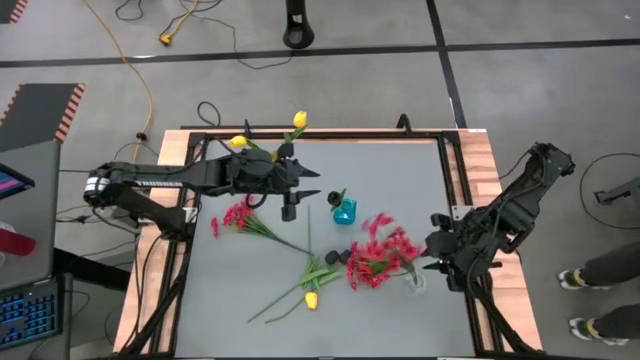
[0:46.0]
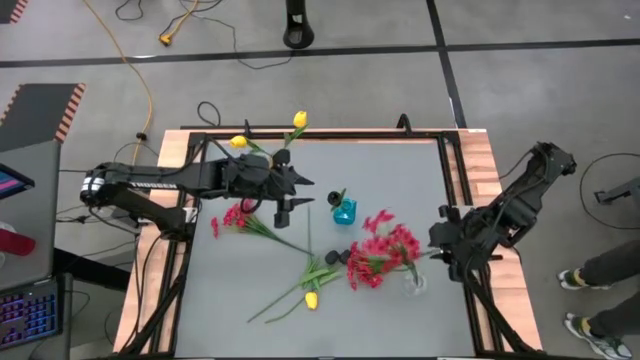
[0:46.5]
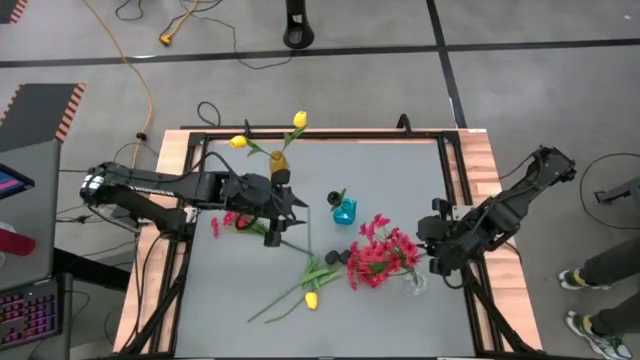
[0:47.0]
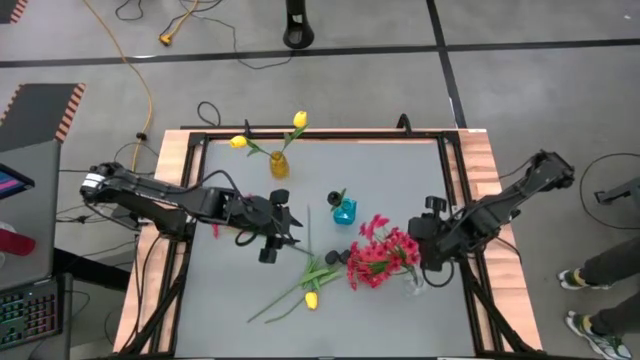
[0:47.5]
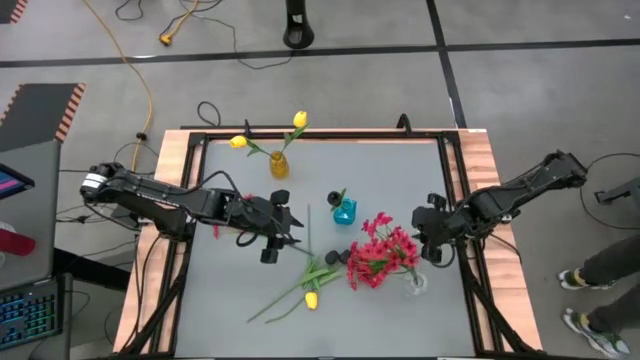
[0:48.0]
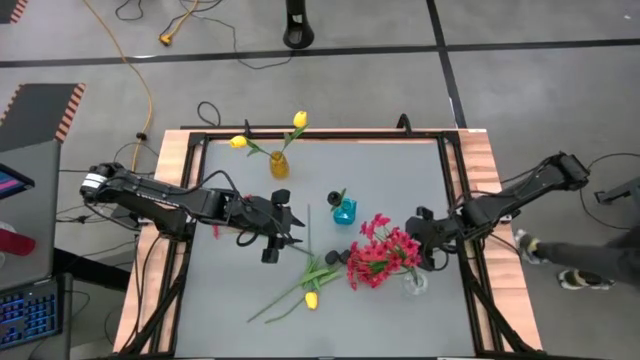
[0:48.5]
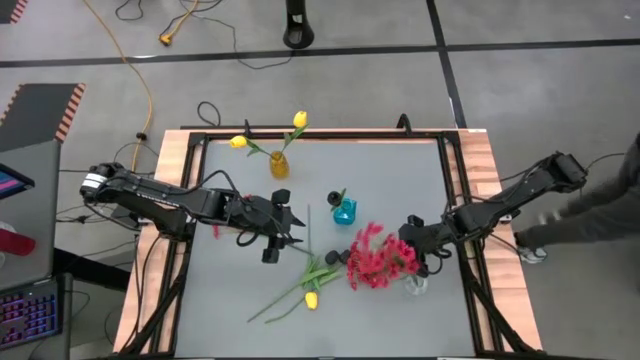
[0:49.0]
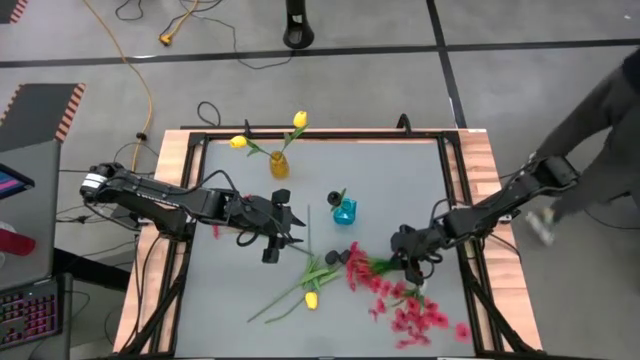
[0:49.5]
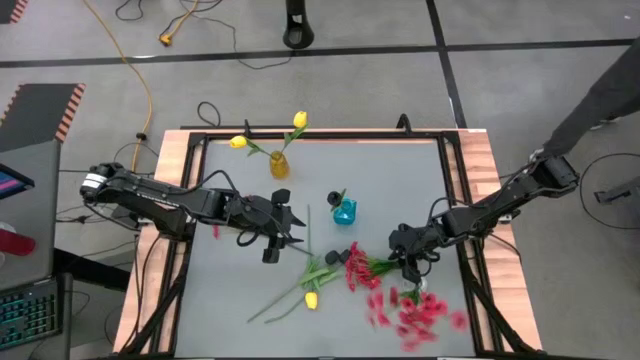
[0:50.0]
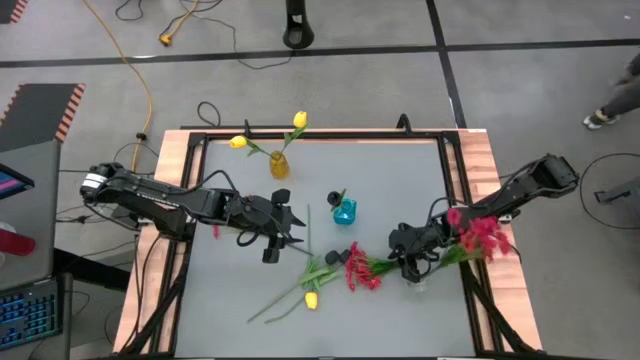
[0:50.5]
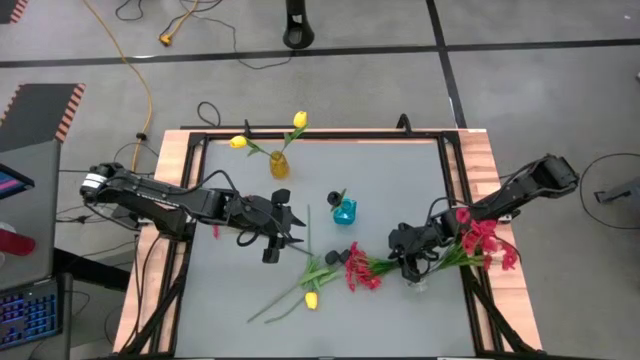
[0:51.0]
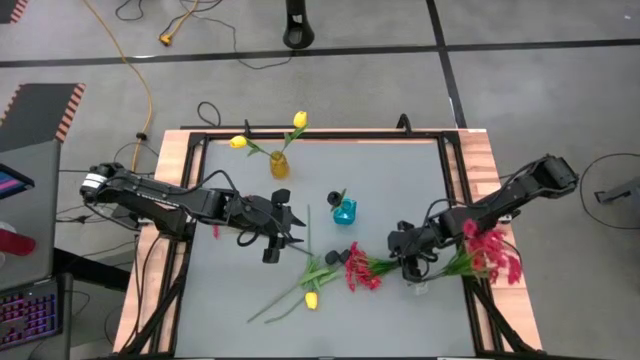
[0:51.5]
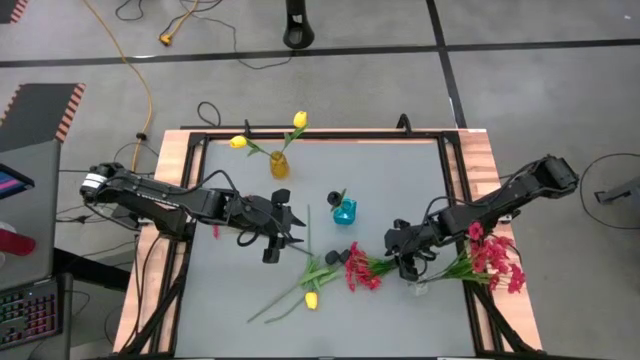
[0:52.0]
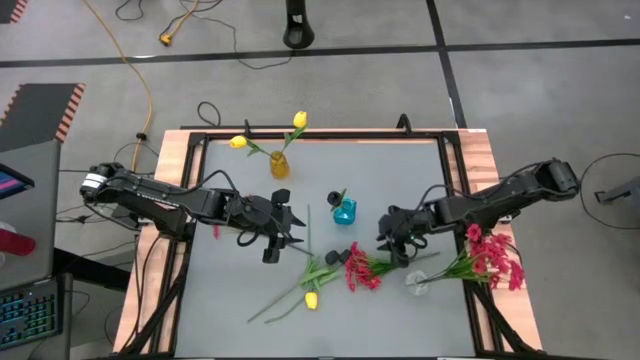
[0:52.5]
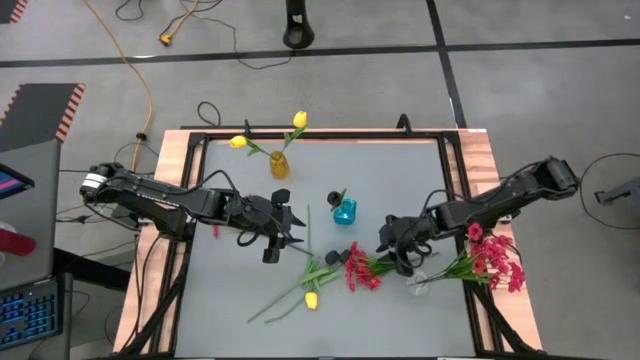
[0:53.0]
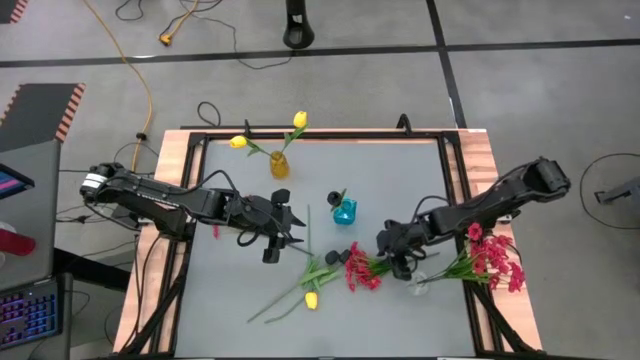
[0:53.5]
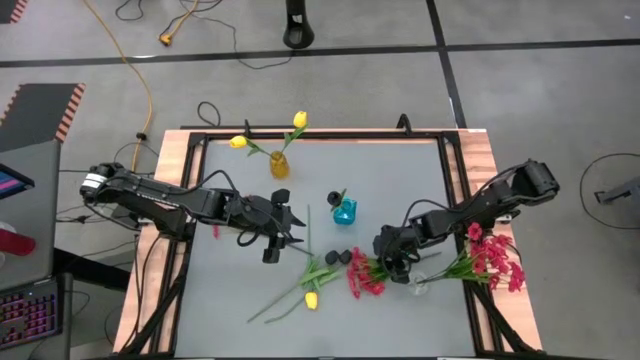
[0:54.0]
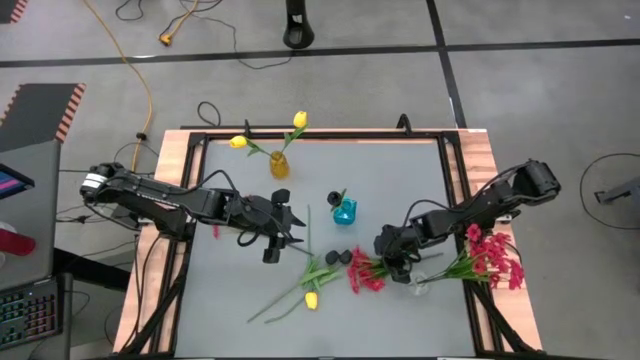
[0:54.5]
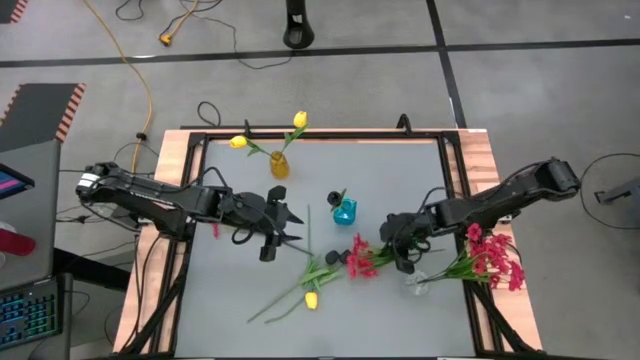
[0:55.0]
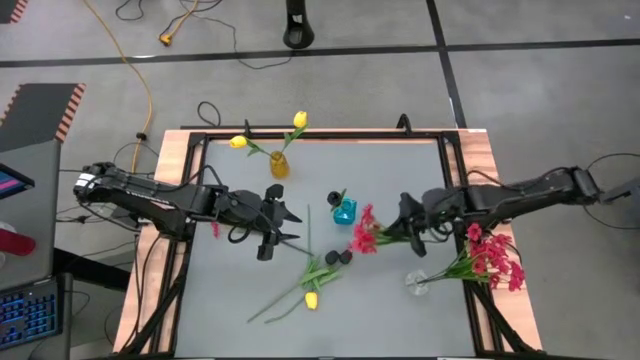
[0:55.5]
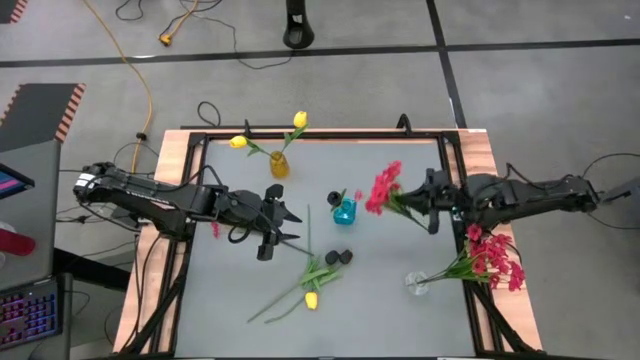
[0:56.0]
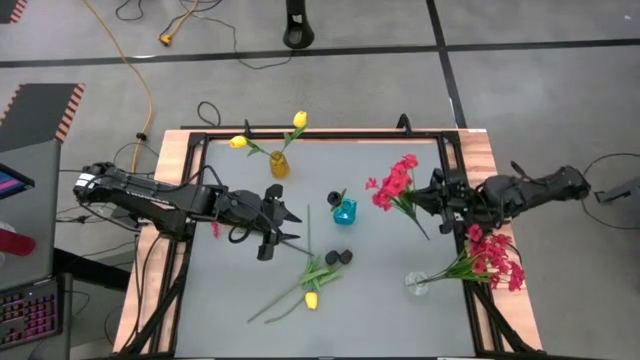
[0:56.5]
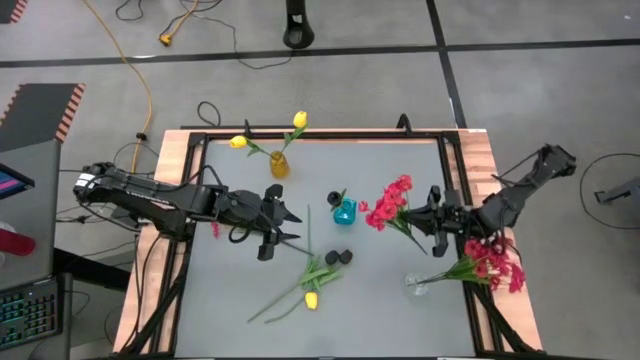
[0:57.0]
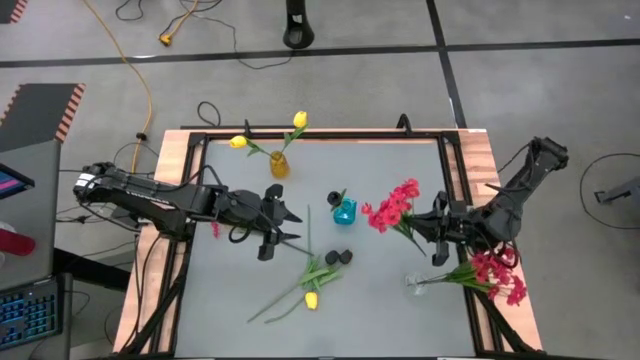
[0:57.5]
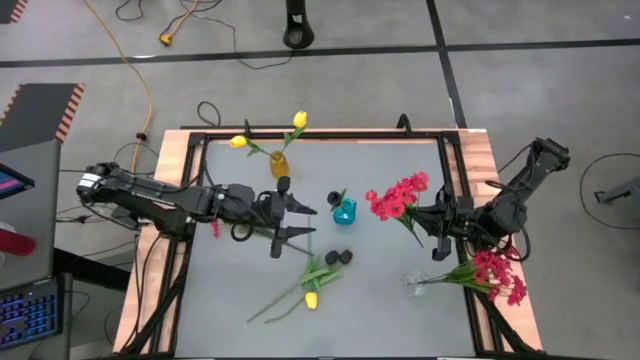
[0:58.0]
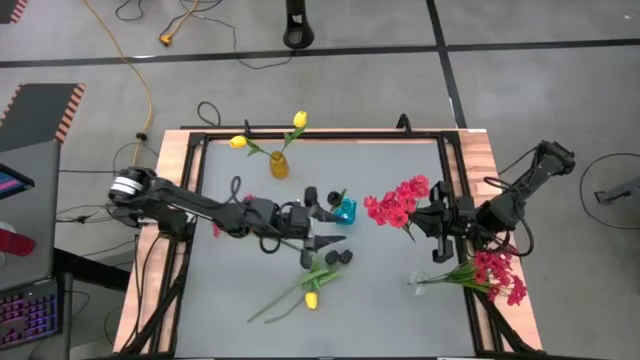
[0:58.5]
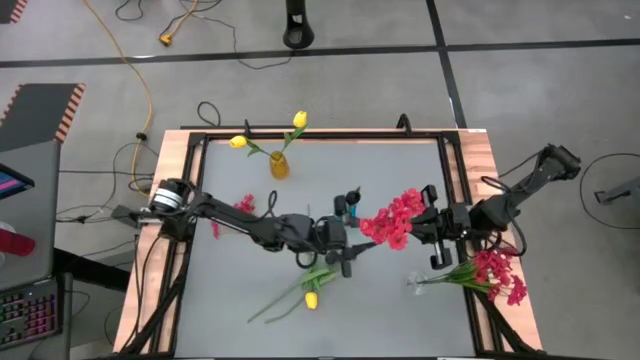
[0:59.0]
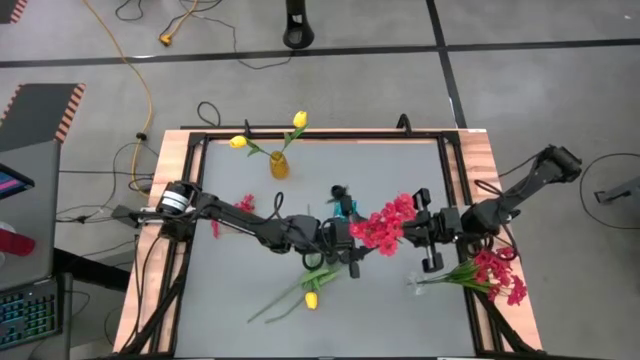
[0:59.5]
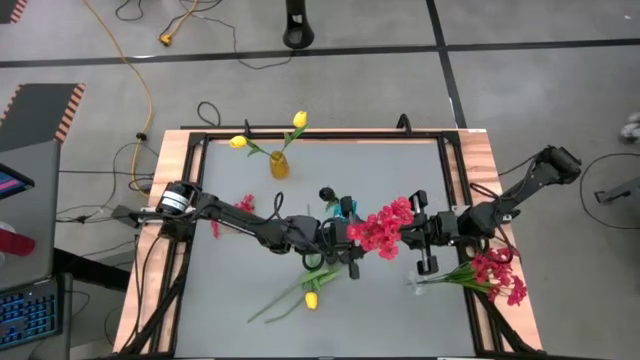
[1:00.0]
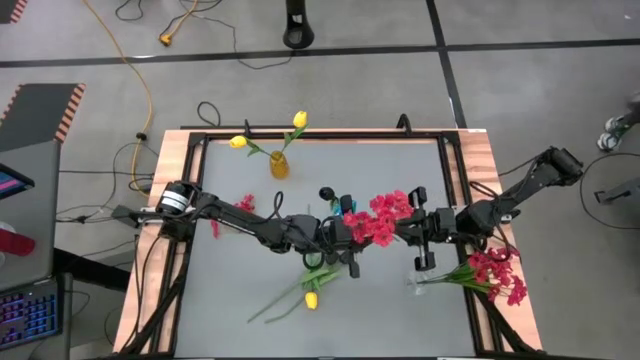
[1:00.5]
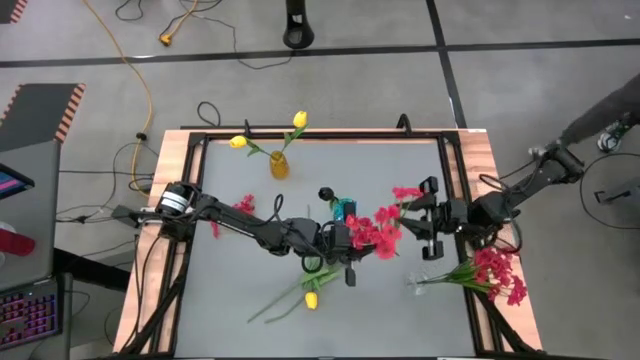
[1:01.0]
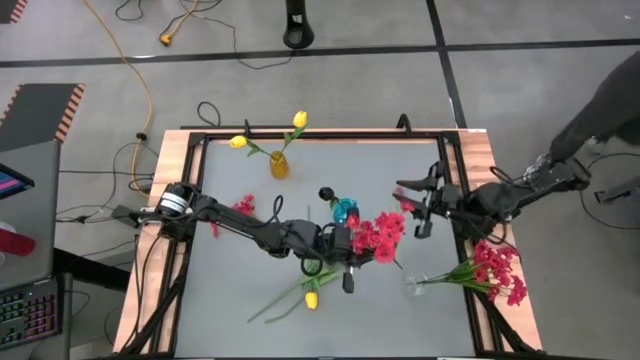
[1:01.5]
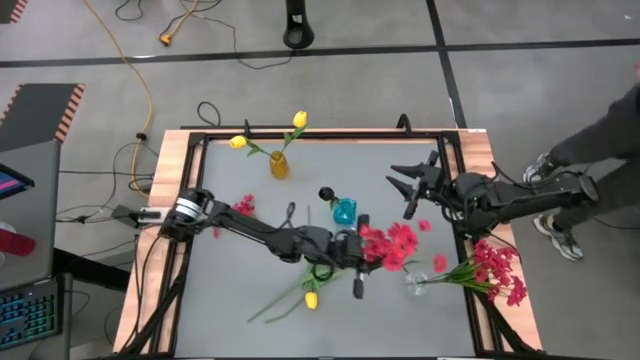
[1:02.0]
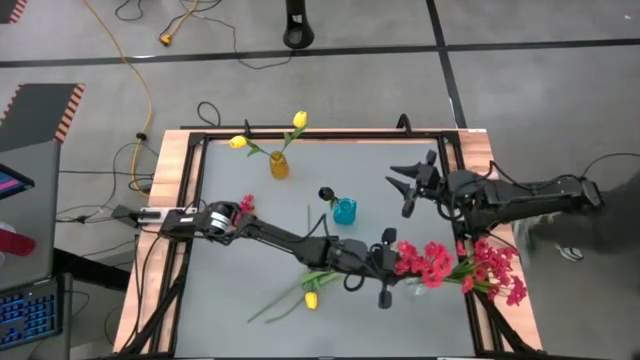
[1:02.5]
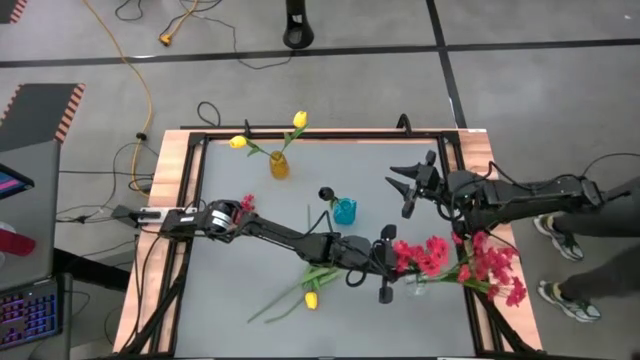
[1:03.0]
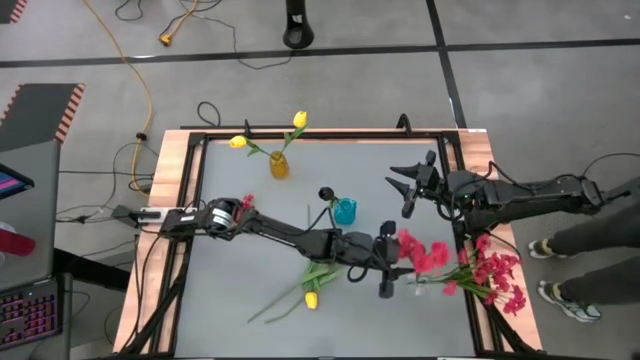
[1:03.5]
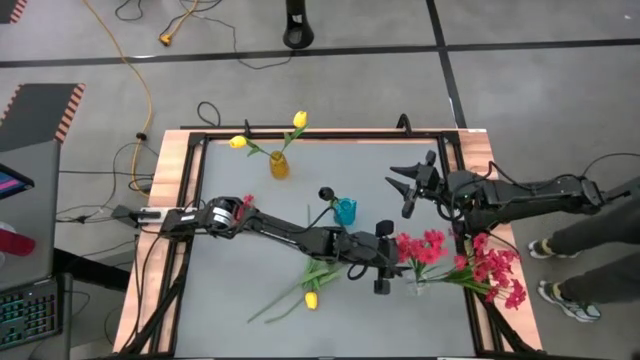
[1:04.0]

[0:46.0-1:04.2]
Task: Sort flowers into vase by color
Put the right red flowers into the transparent vase

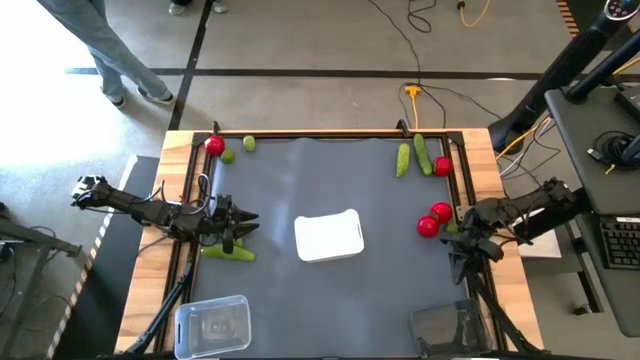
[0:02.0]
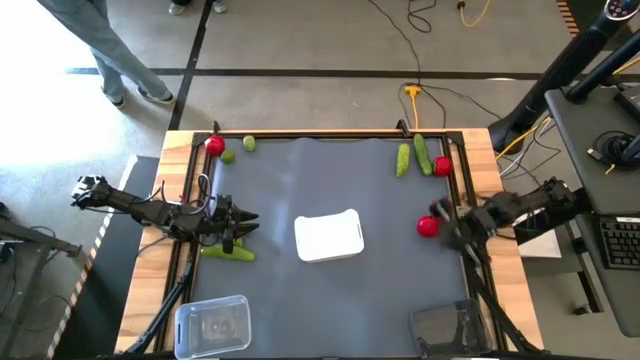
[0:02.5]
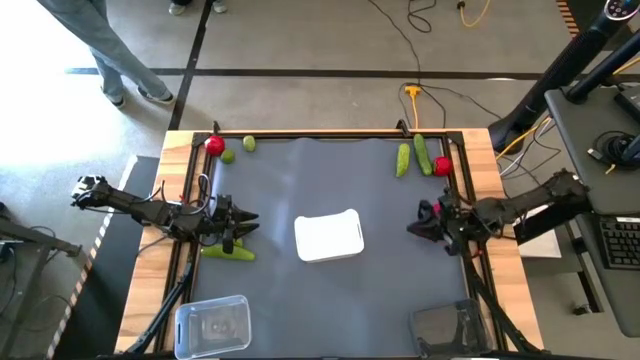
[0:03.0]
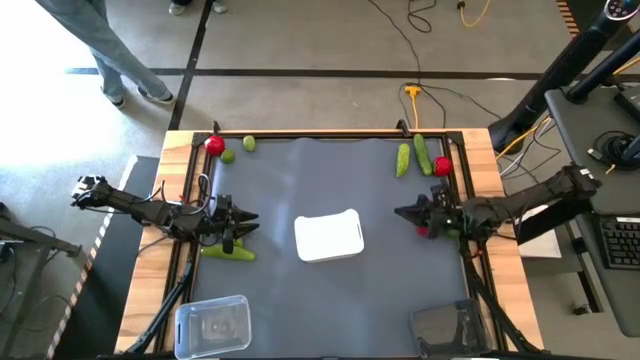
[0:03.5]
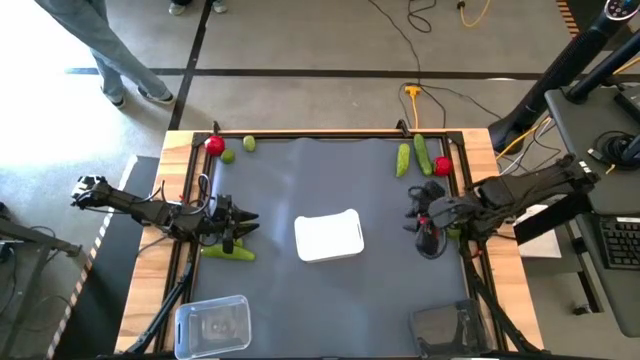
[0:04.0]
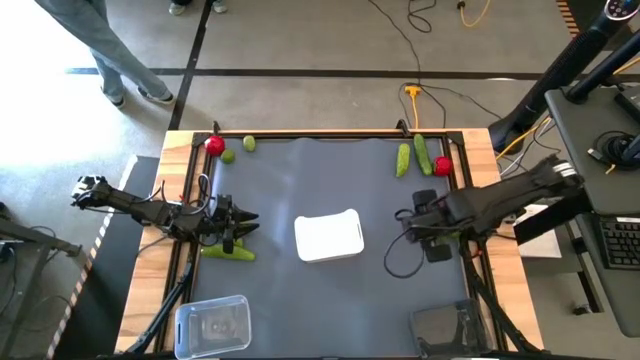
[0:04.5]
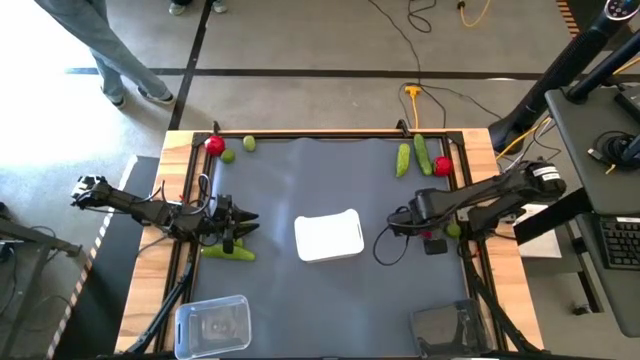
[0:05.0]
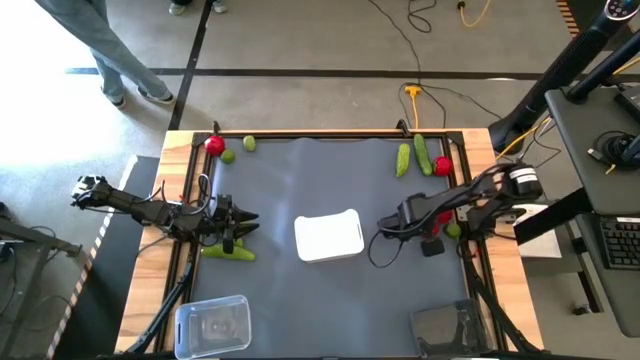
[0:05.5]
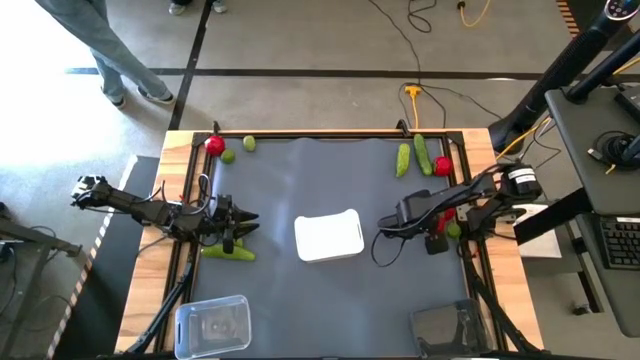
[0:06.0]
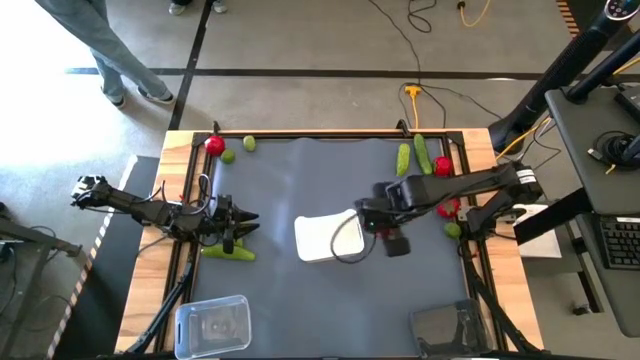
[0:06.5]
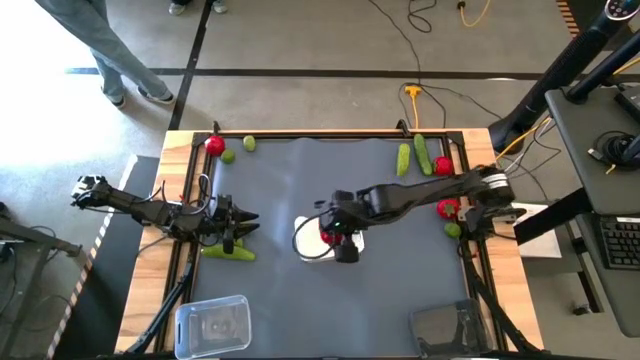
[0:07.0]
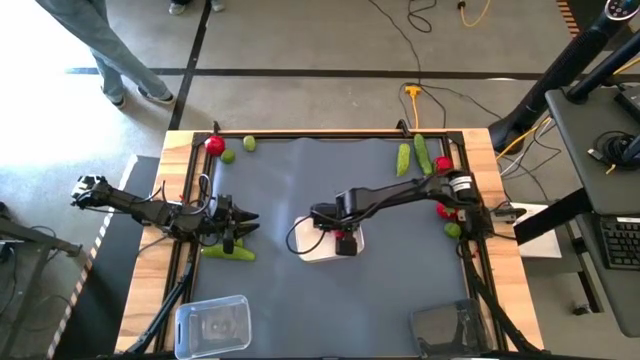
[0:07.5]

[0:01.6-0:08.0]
Task: Sort produce into baskets
Put the bottom left tomato into the white bin
